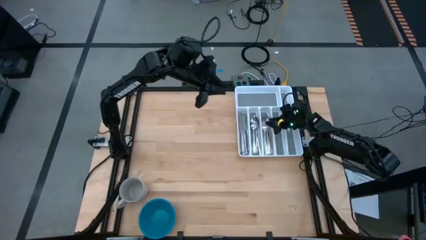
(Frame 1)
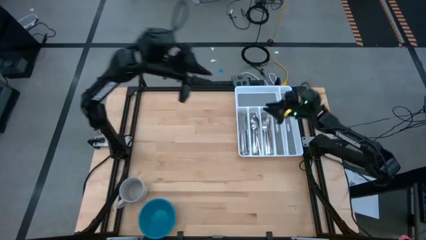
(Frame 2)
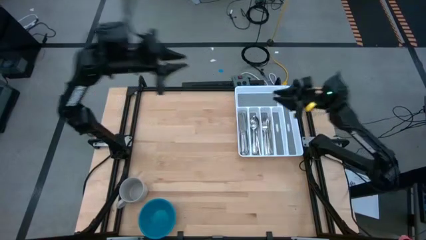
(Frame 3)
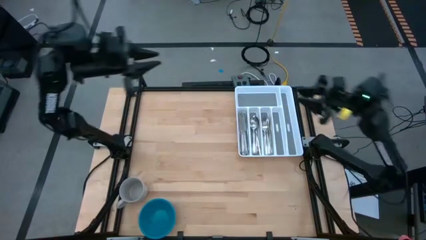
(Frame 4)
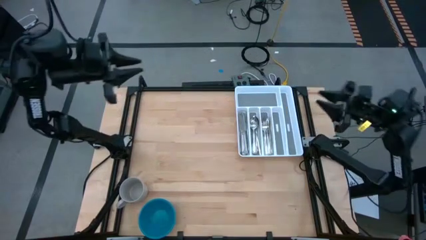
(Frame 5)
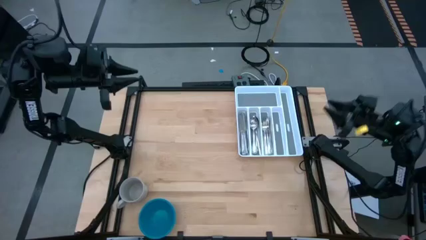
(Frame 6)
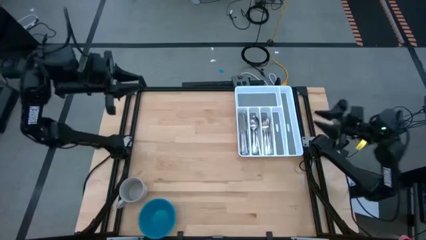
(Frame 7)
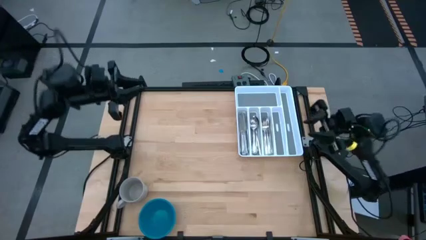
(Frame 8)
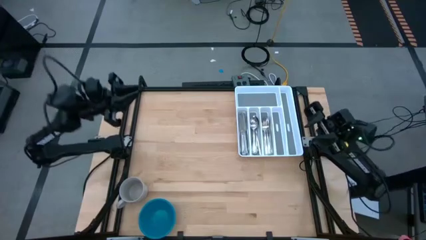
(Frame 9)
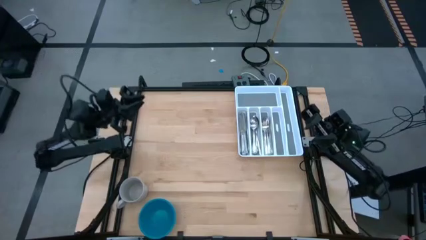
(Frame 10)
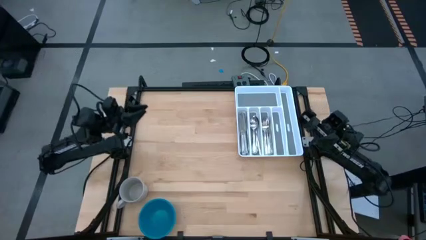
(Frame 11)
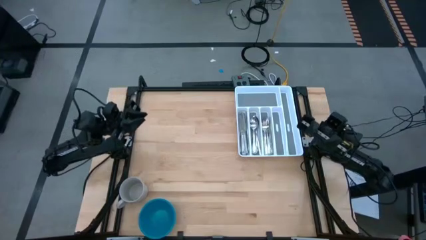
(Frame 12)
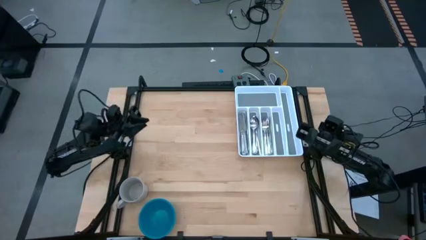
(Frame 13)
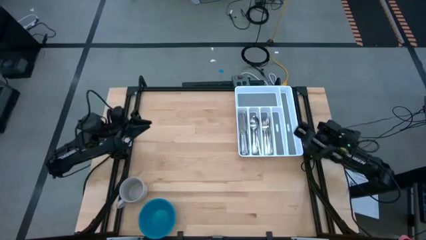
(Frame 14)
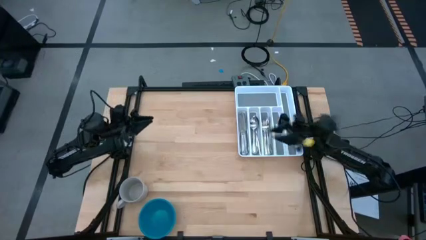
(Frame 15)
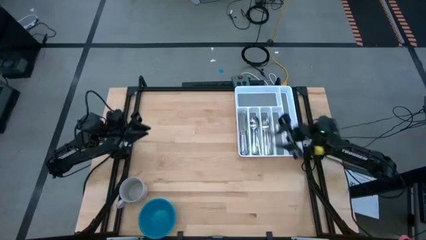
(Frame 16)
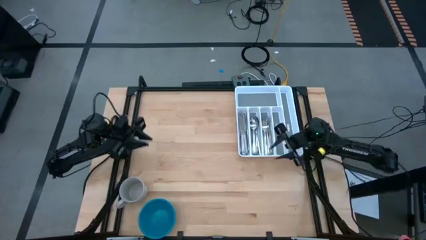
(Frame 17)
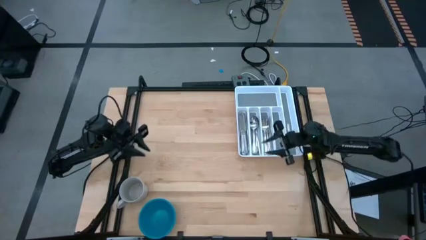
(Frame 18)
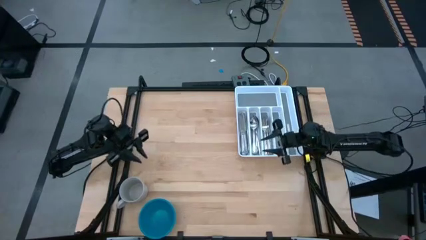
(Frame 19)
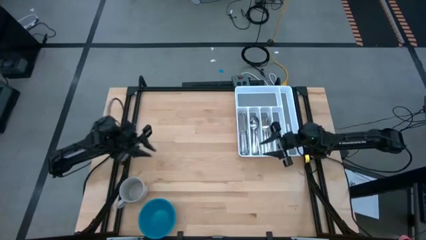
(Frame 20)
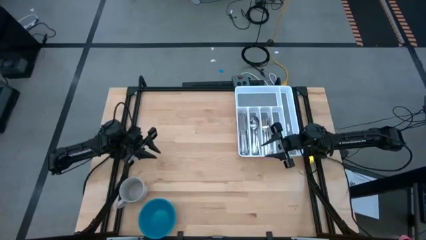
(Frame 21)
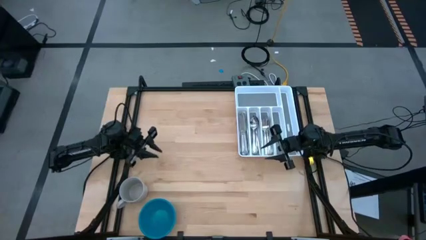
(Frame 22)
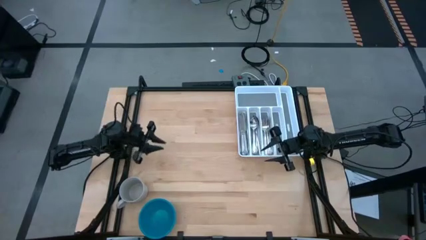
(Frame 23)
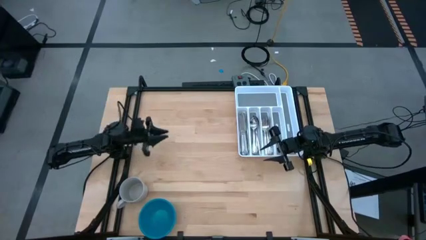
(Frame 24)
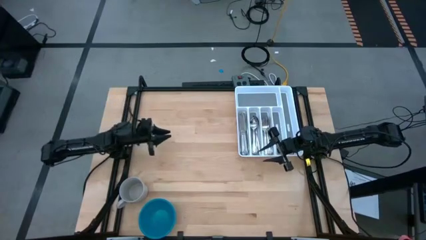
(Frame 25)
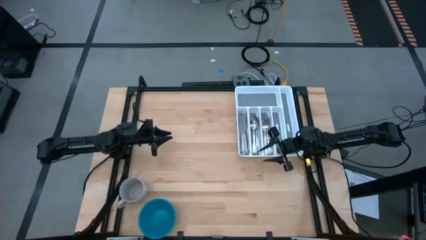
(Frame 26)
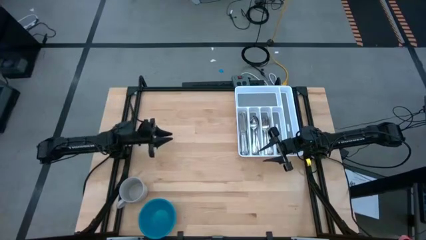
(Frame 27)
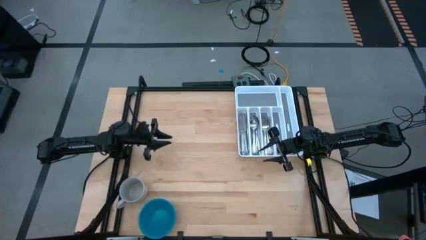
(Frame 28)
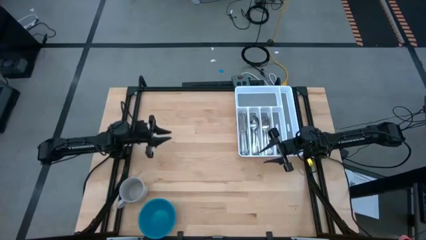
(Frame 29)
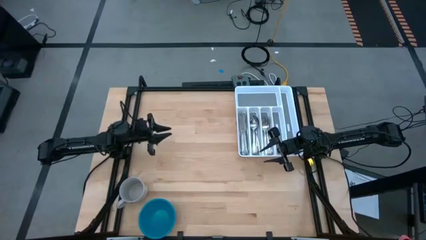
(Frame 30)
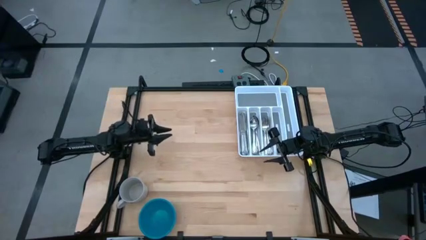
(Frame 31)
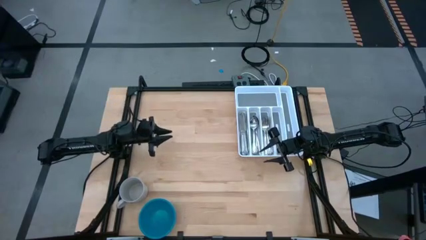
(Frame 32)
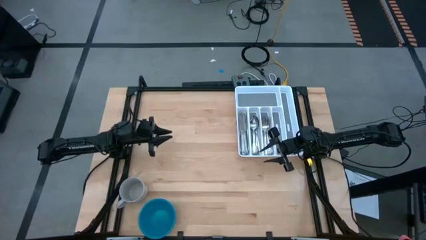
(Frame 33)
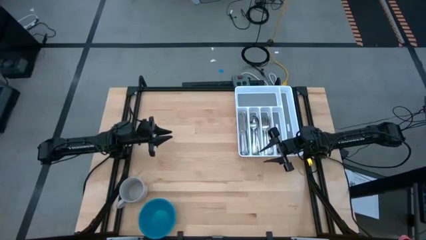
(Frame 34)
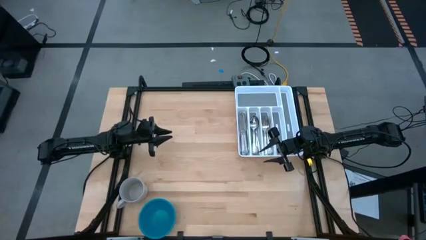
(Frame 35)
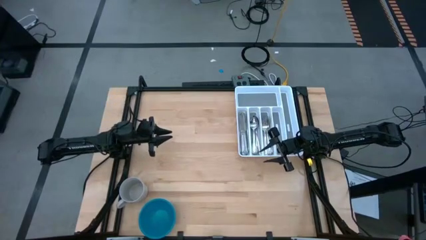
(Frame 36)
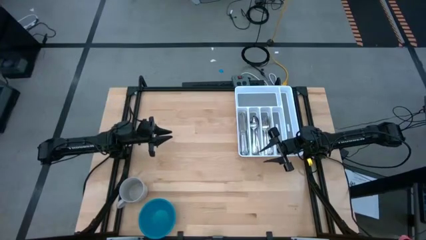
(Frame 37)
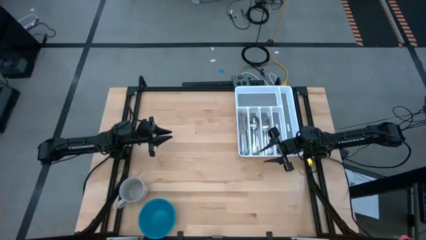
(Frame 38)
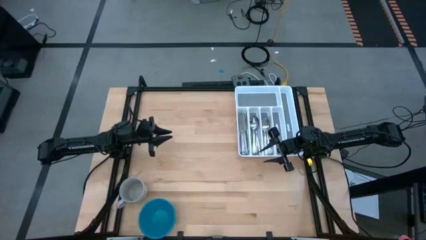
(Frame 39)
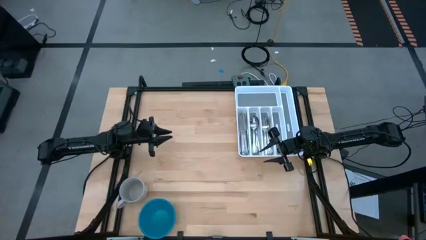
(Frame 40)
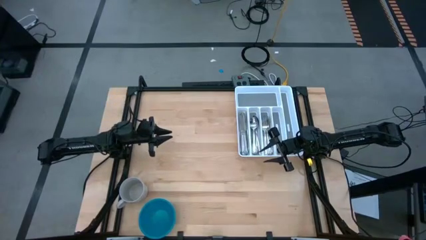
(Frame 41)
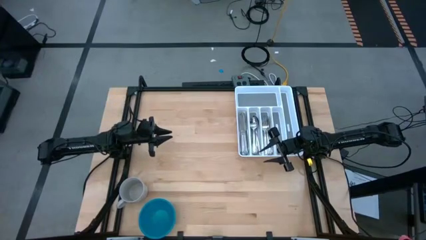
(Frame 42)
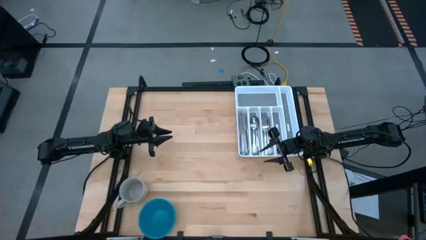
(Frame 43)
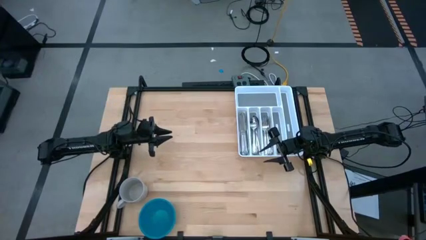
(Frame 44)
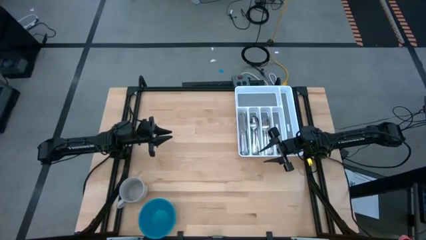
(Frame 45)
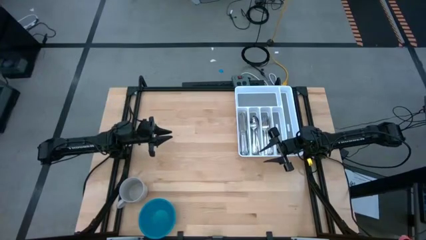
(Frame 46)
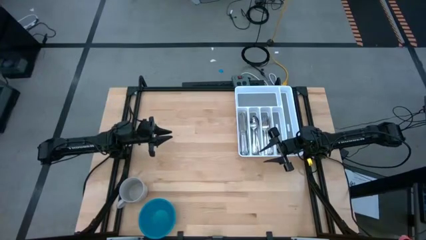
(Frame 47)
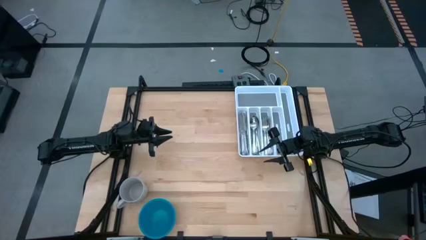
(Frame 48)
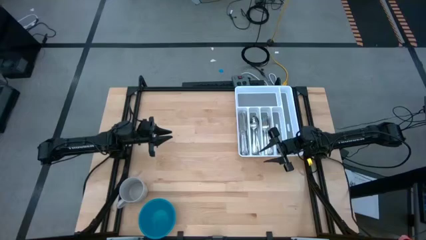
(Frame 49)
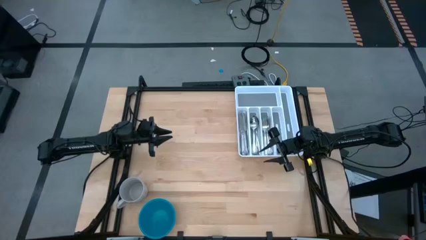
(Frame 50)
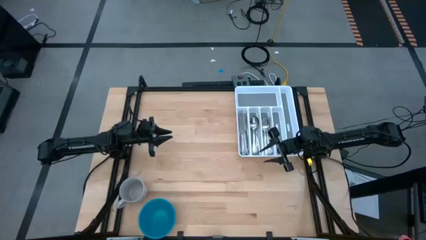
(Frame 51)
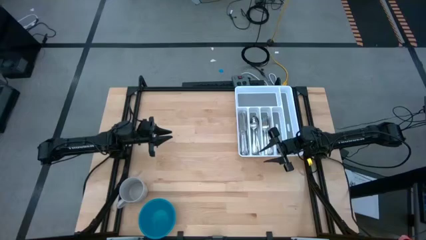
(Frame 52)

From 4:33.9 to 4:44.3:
Task: Sort silverware
Return to Home Position

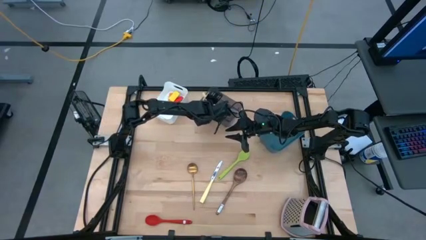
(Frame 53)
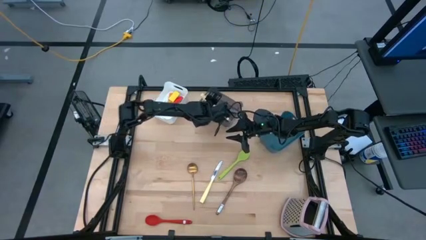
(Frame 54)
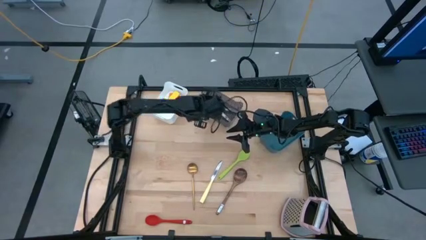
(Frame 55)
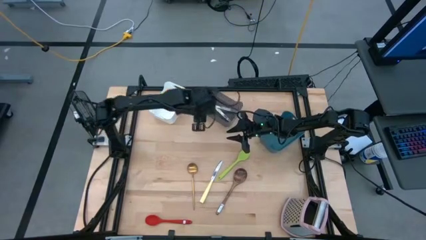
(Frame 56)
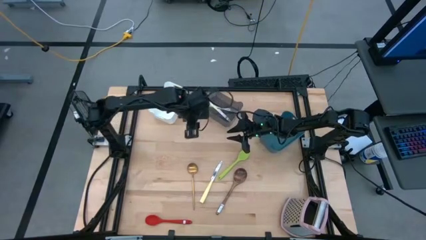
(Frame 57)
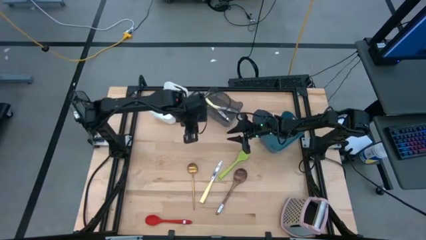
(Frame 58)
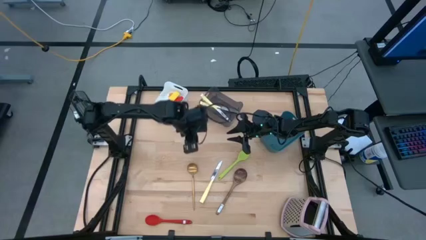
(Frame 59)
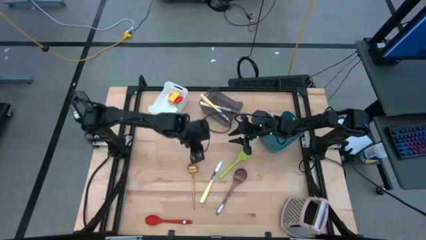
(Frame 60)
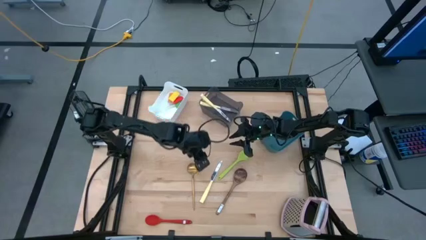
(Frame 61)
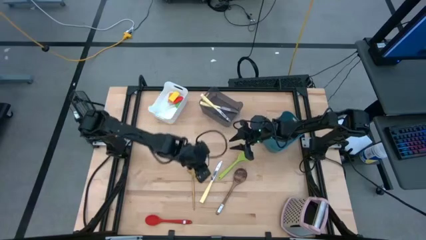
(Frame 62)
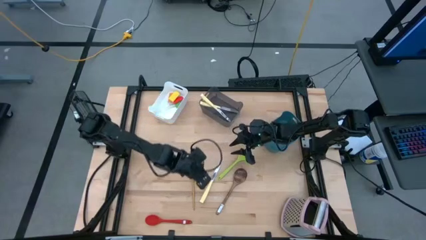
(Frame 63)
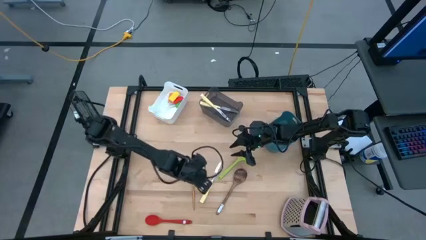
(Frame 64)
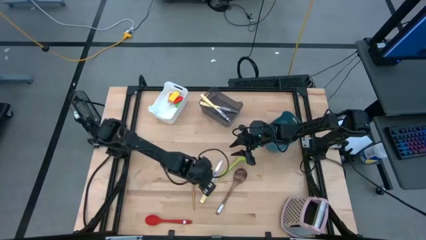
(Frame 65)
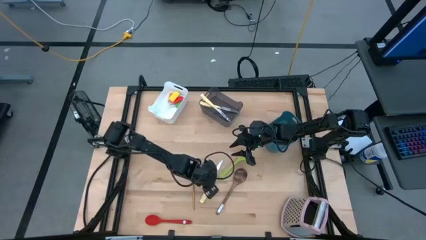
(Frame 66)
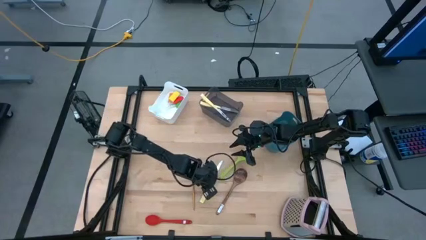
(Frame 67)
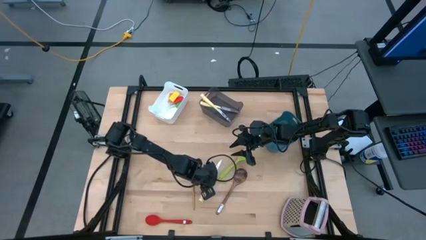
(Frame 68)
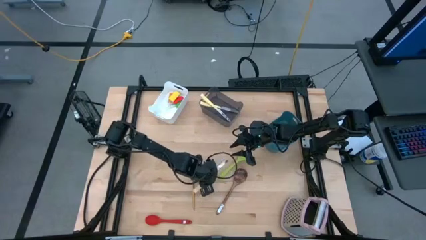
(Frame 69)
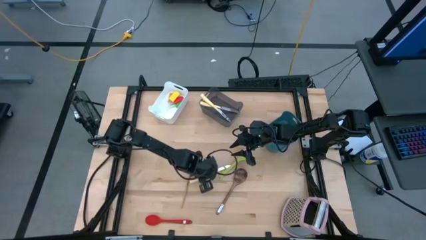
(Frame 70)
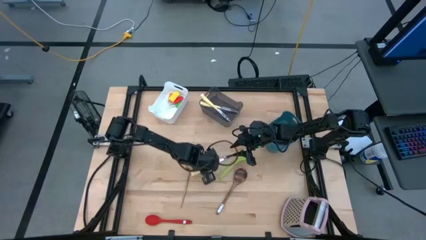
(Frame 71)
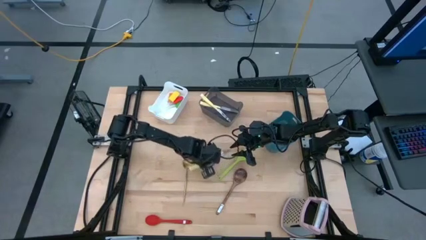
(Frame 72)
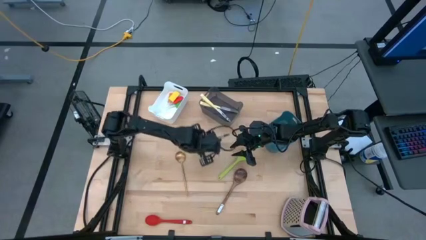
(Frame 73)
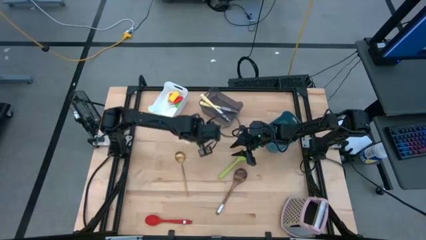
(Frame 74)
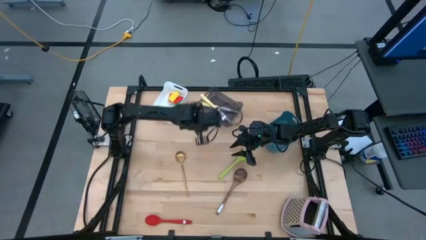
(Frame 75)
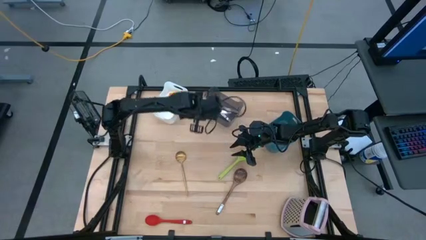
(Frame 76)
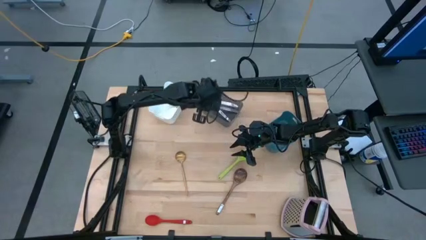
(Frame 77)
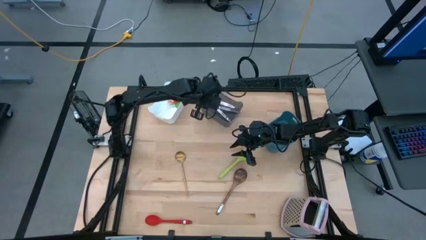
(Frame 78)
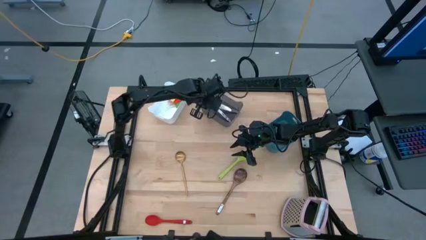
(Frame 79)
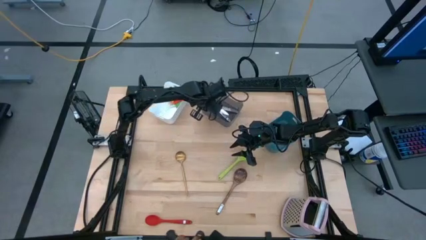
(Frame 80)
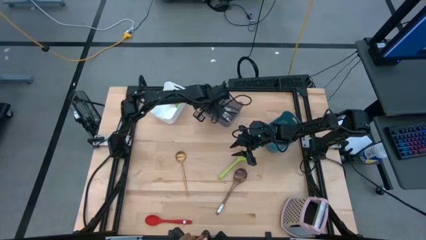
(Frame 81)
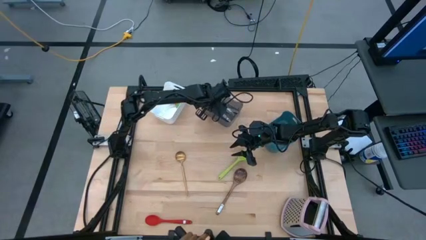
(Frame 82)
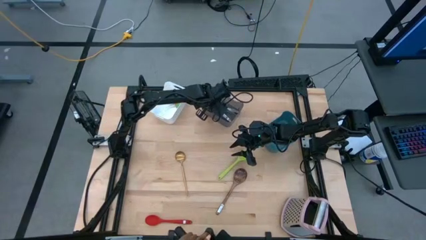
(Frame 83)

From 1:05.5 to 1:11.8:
Task: Pick & Place Kitchen Items
Put the yellow table knife into the black bin
